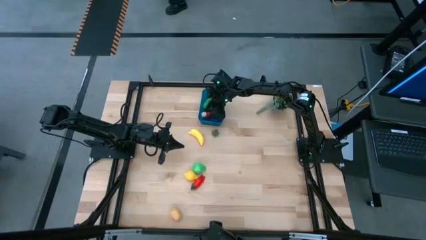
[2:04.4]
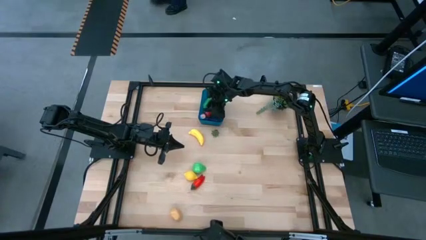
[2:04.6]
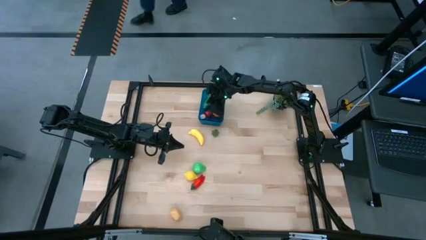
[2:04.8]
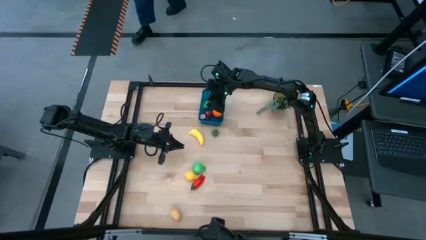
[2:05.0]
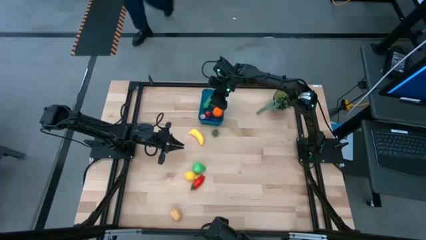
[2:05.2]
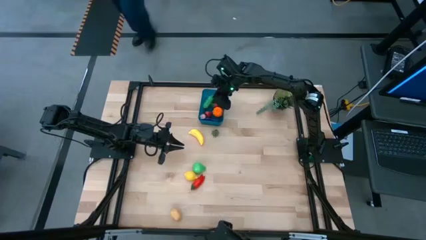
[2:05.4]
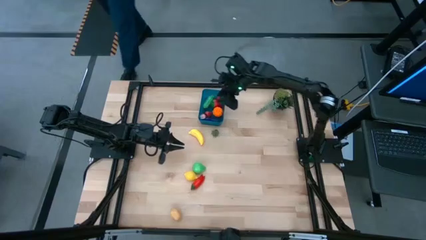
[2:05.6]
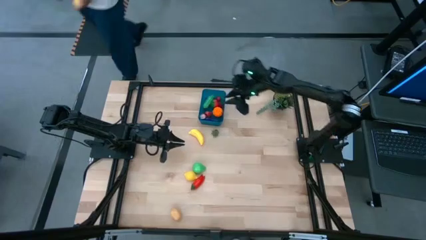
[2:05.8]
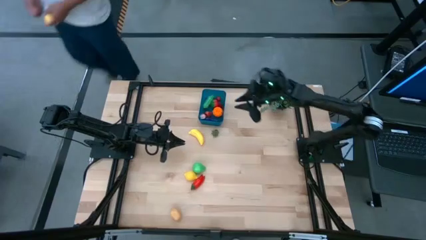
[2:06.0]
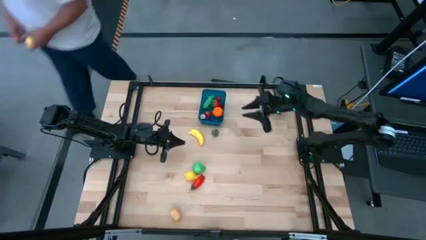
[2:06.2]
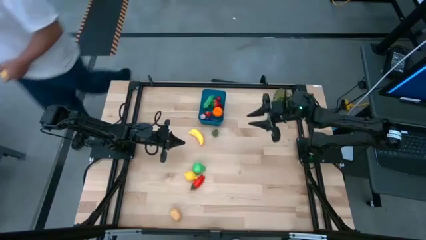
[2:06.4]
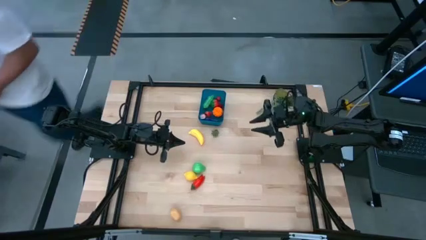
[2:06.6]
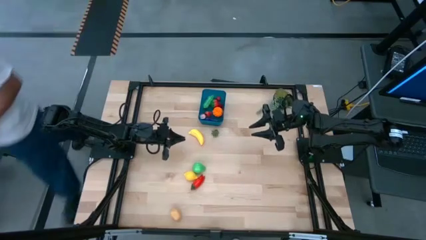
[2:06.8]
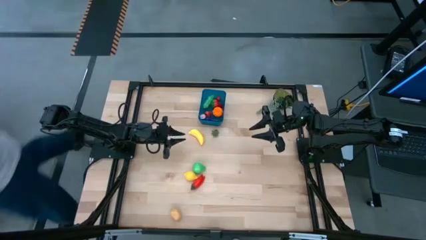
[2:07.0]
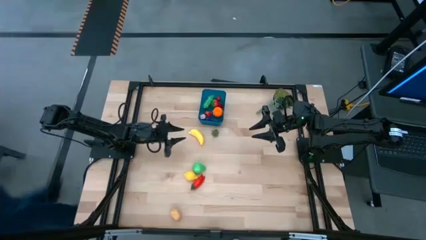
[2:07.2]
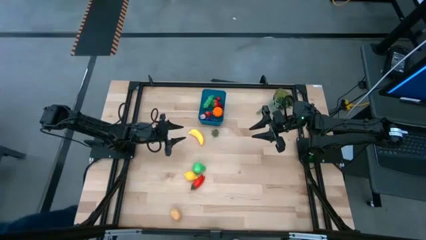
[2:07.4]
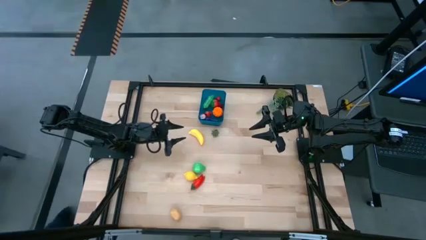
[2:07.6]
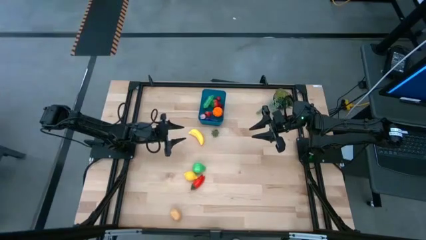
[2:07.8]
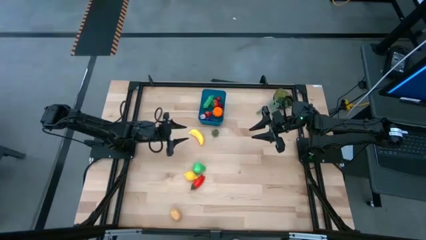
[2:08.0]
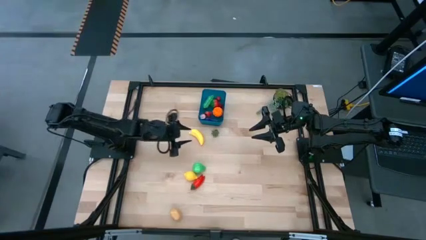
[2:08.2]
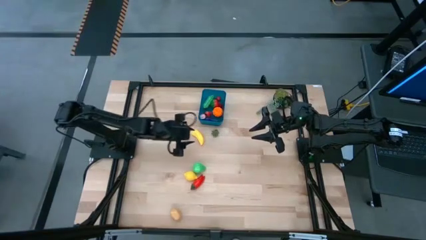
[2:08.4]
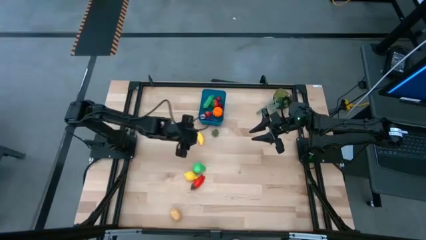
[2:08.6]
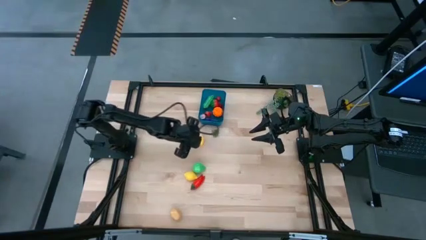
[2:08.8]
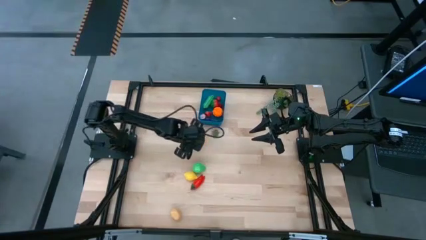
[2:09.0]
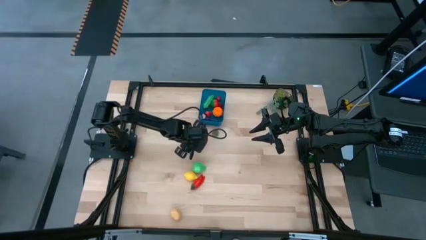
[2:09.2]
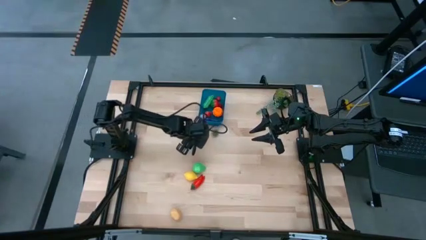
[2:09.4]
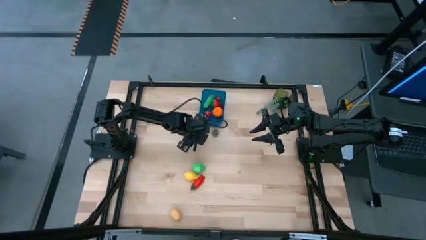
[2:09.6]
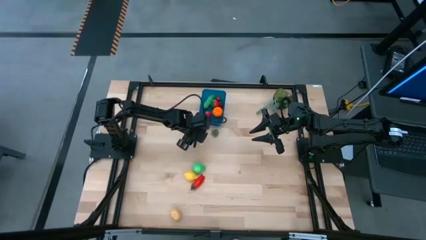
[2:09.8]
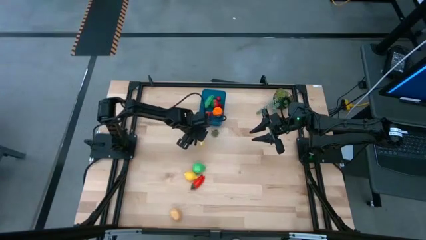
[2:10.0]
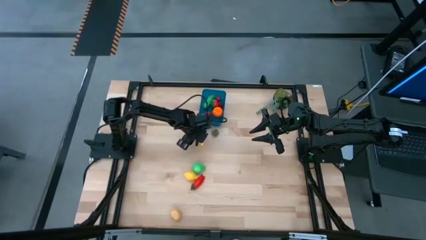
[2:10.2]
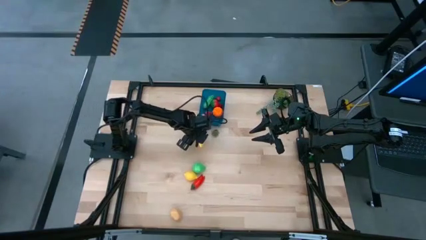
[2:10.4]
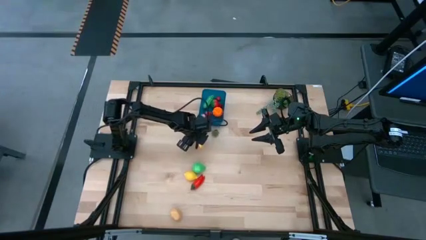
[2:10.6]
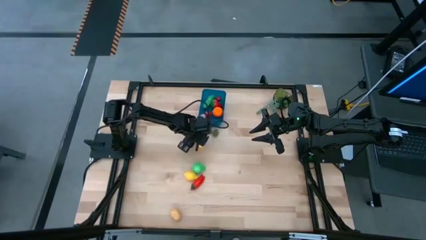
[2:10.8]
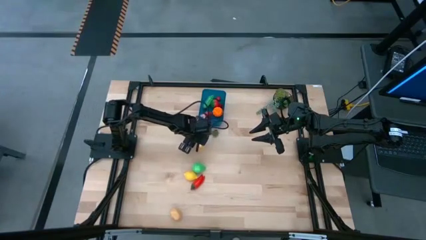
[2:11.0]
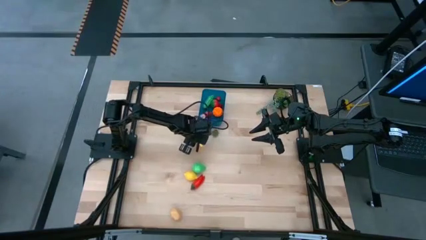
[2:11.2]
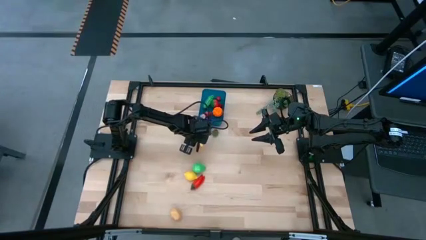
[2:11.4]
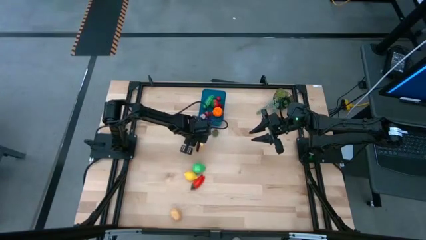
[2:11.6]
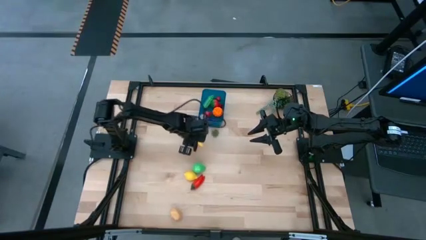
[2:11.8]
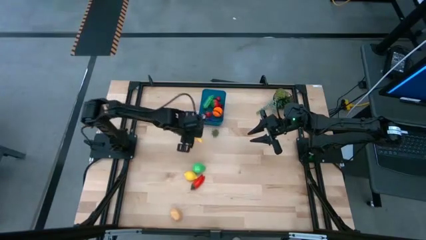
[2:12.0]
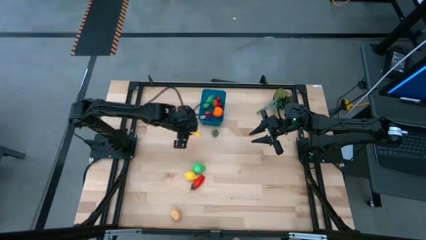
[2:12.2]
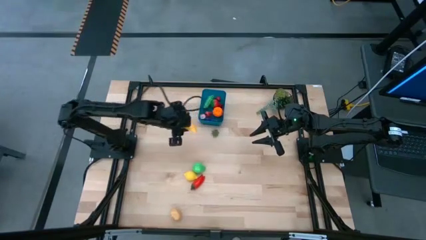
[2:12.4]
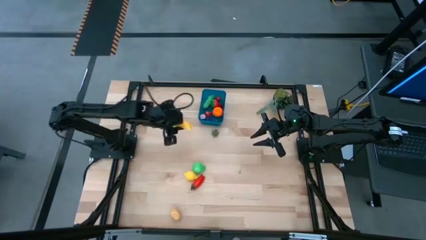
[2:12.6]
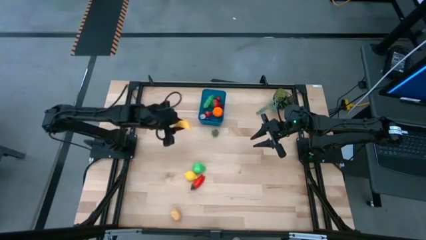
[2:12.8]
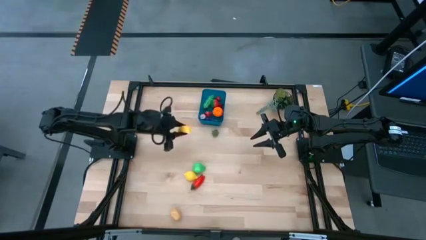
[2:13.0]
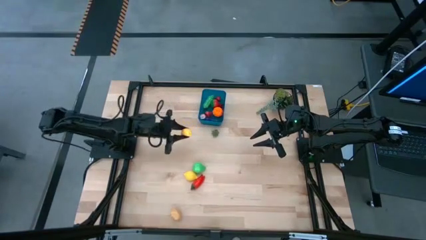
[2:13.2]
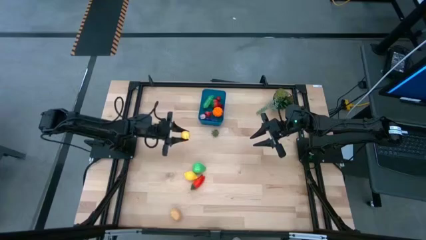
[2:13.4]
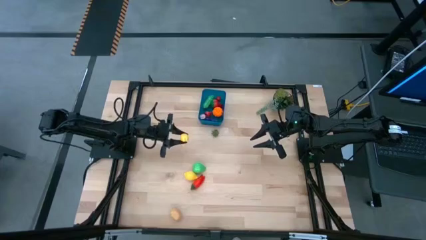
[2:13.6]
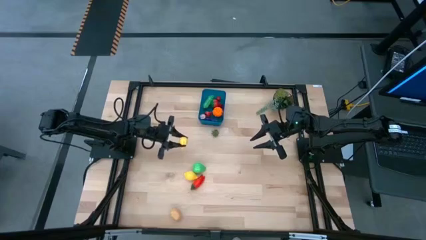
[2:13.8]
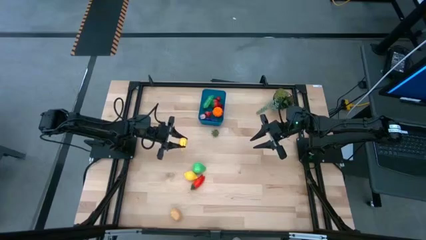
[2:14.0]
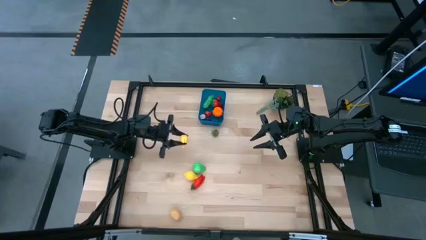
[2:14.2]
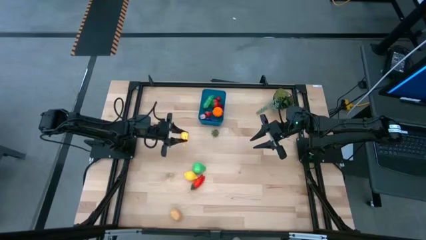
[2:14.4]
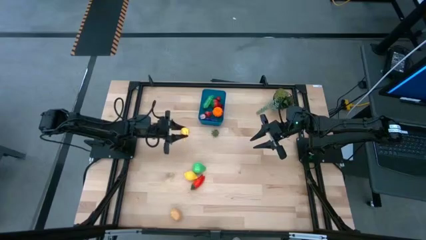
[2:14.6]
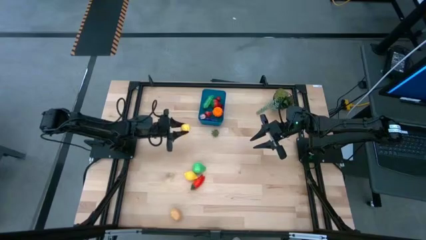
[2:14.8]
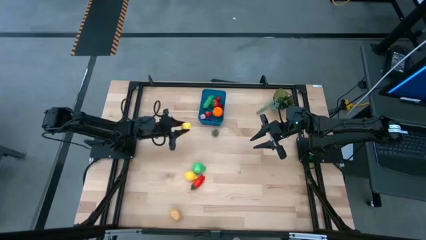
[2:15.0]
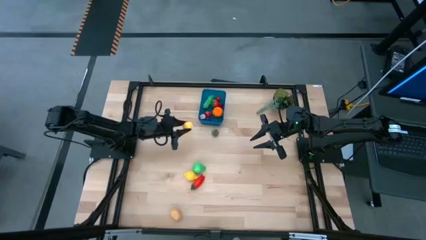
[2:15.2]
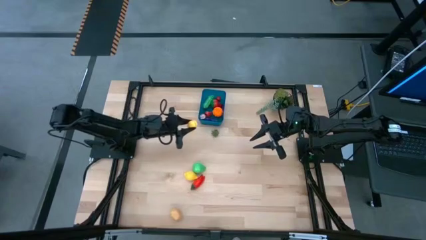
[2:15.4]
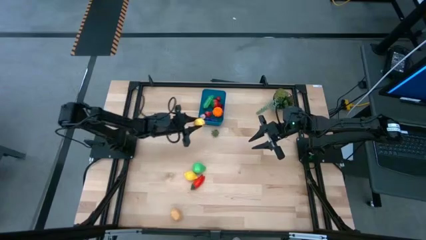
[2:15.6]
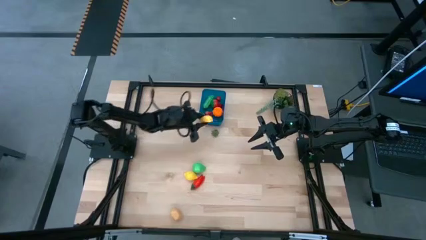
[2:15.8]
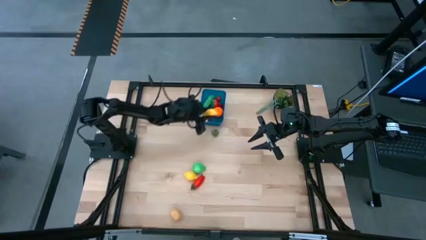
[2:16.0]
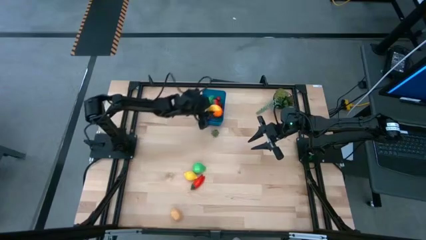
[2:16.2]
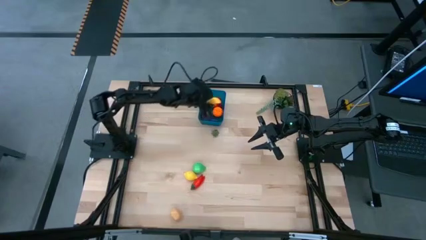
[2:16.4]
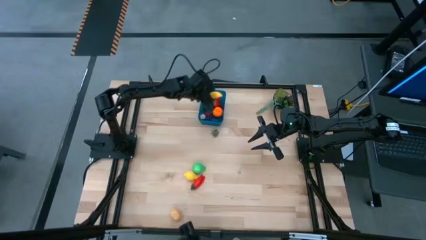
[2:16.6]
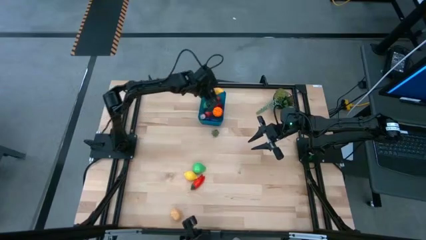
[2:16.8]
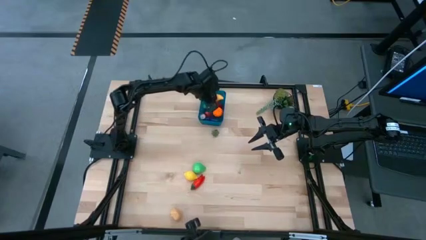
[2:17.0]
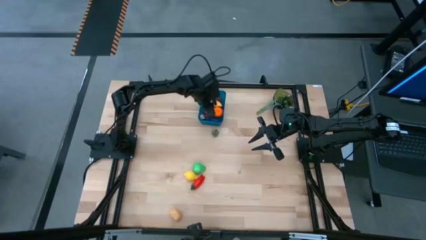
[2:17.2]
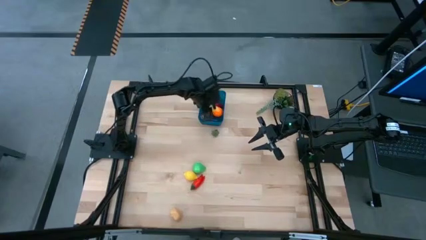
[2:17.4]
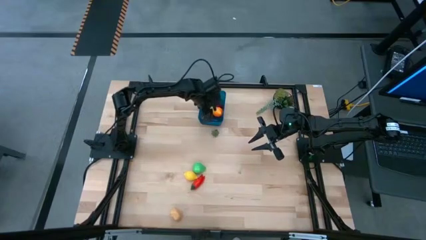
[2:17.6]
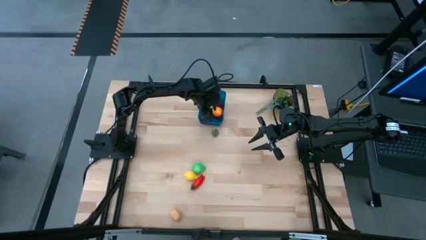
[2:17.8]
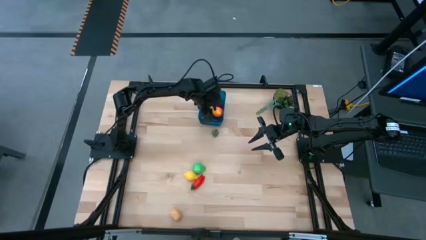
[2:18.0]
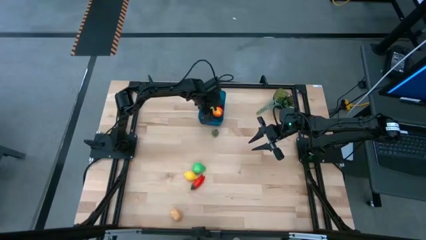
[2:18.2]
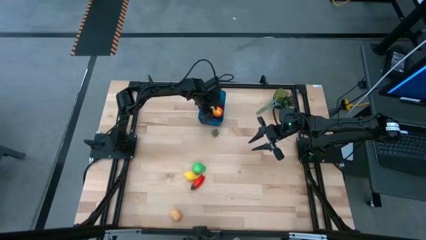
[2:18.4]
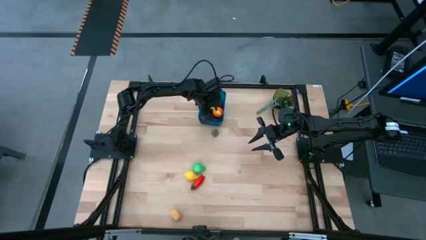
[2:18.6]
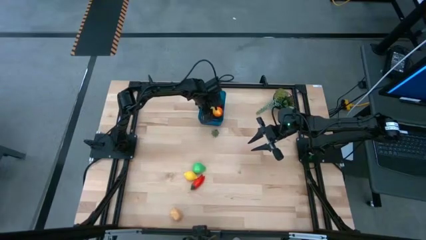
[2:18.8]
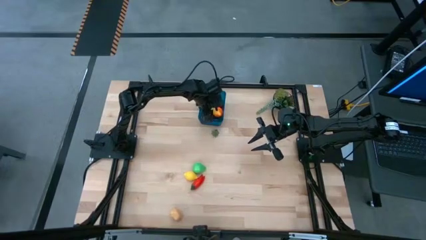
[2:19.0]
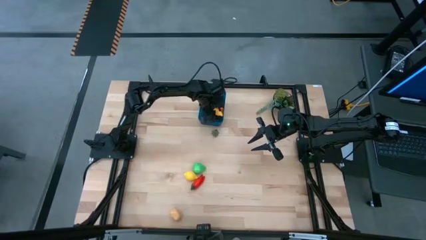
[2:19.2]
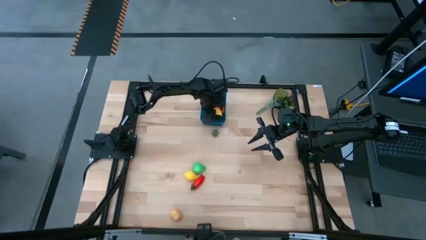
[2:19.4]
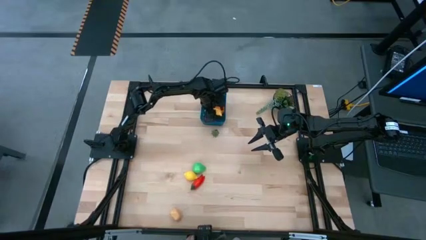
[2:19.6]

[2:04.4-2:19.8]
Task: Pick and placing Produce into tupperware
Put the banana into the blue bin

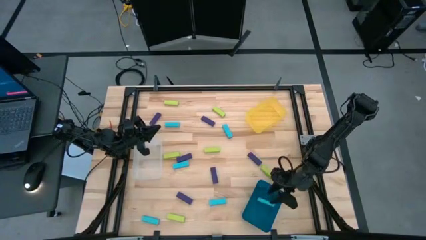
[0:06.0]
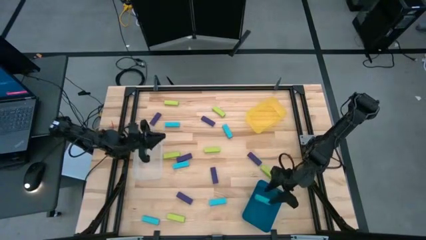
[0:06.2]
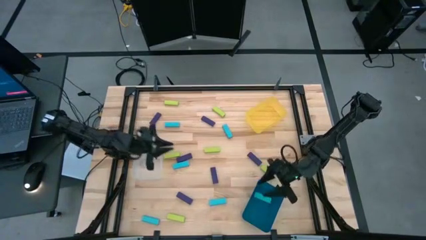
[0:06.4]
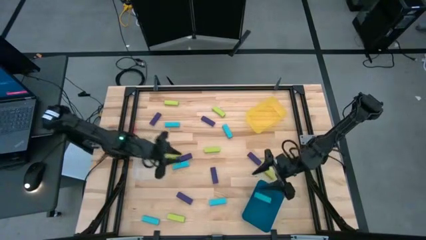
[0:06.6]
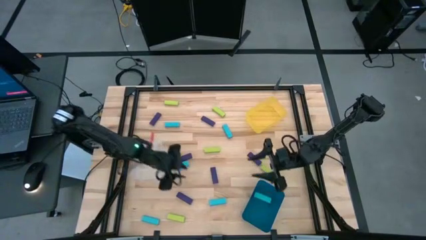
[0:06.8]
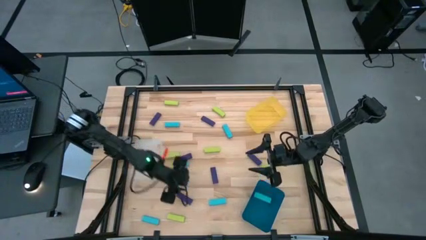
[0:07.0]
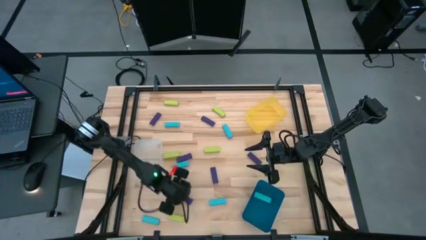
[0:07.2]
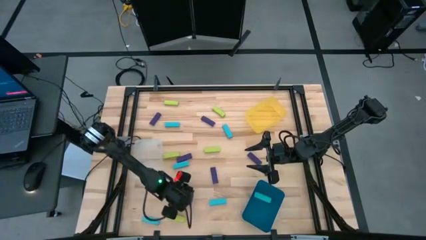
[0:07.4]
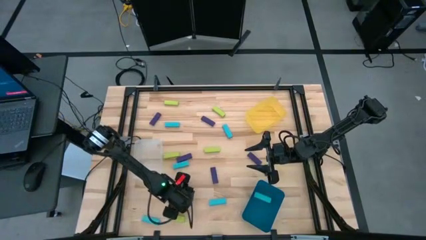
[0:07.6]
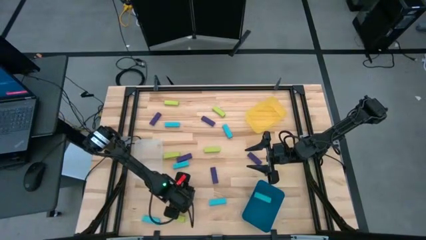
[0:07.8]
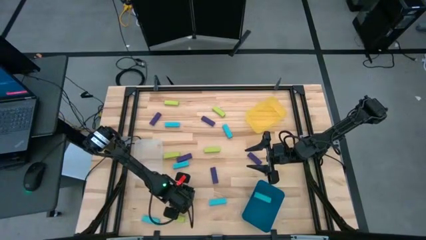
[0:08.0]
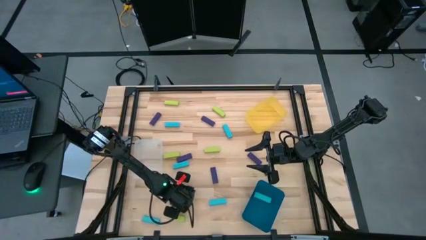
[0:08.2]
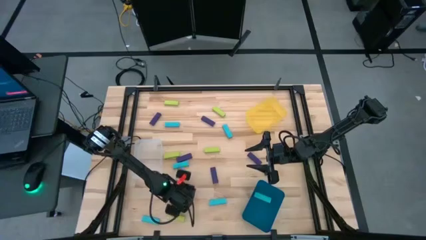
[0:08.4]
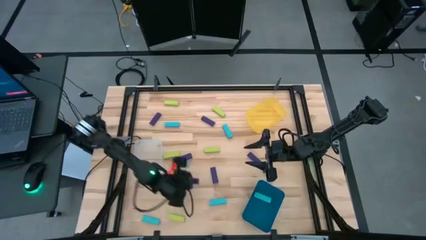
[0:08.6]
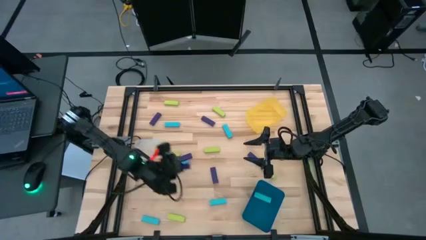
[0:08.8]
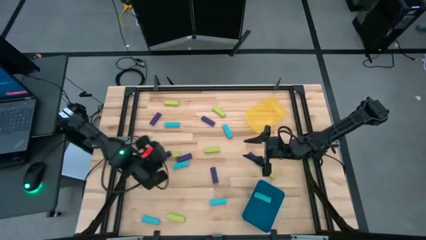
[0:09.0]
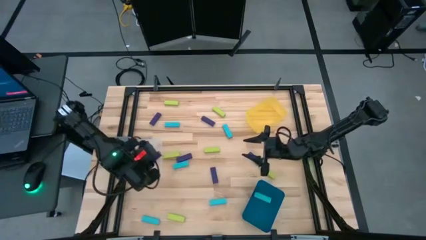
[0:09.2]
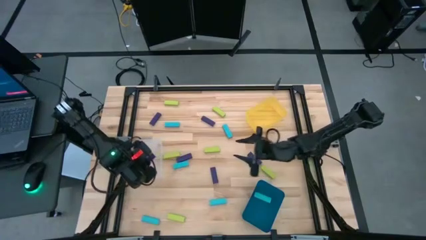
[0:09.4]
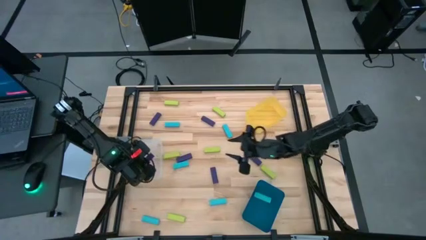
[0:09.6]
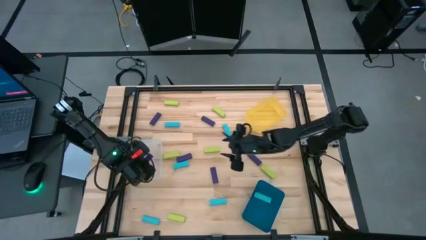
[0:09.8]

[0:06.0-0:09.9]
Task: Sort blocks
Put the violet block into the transparent bin
